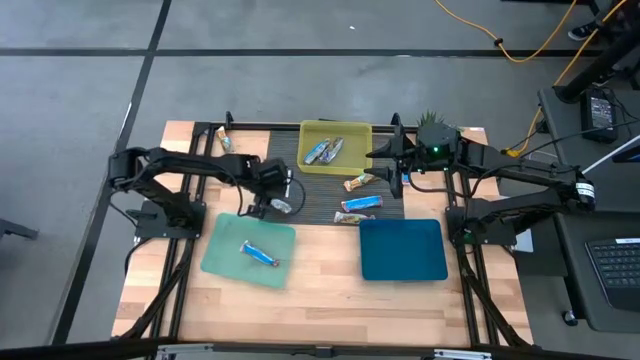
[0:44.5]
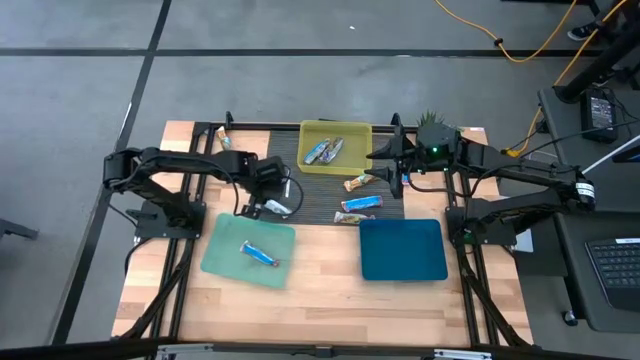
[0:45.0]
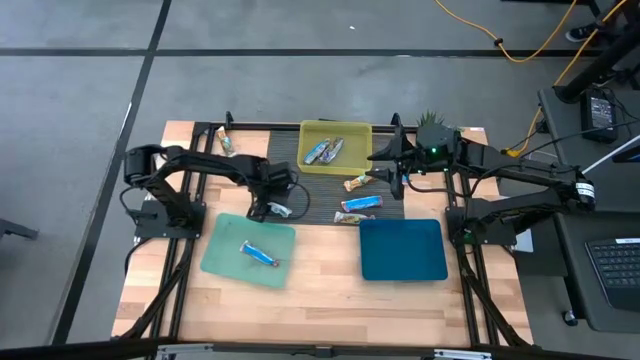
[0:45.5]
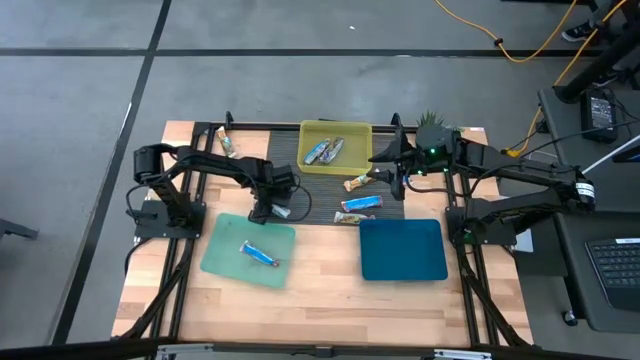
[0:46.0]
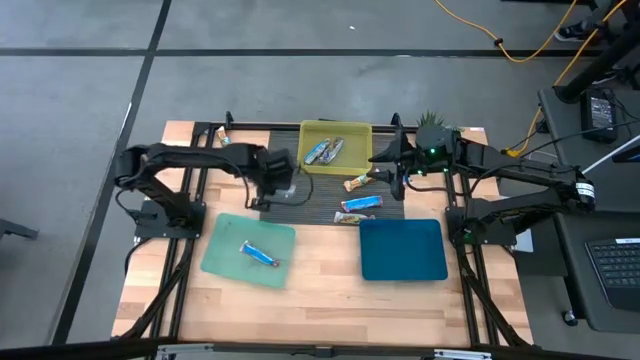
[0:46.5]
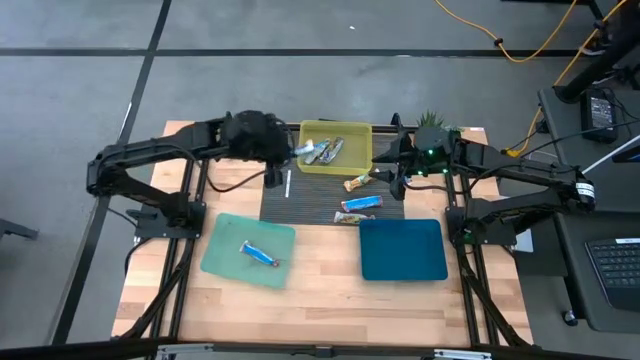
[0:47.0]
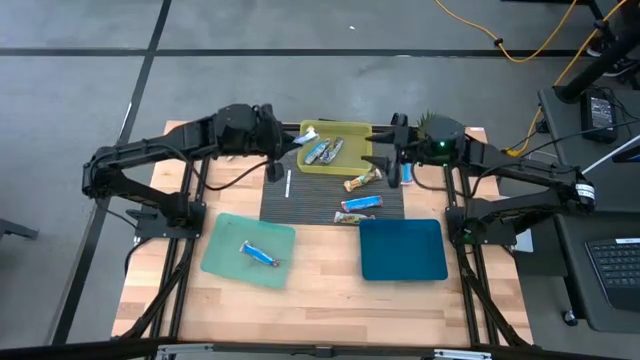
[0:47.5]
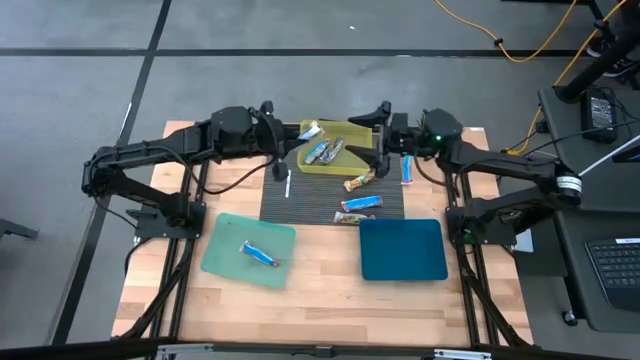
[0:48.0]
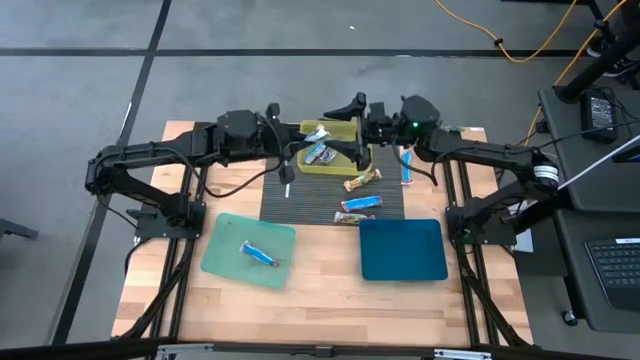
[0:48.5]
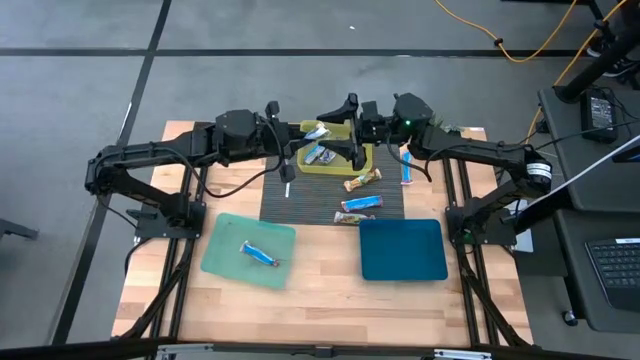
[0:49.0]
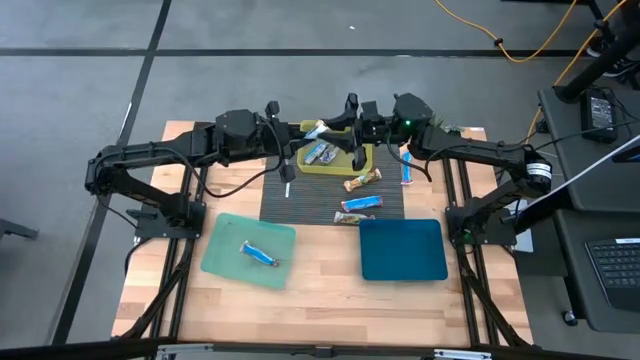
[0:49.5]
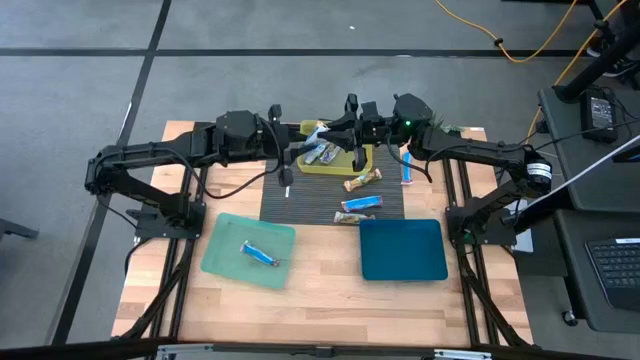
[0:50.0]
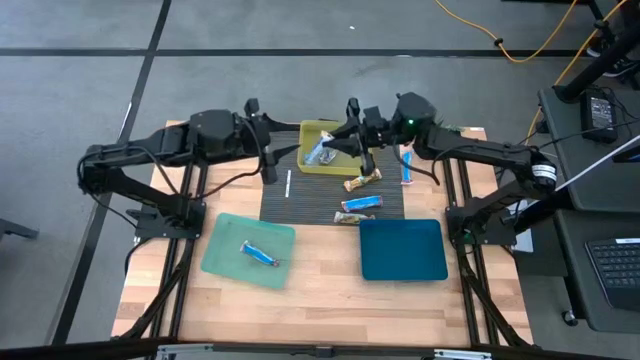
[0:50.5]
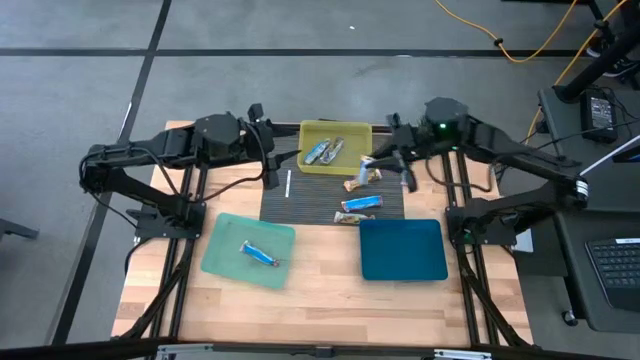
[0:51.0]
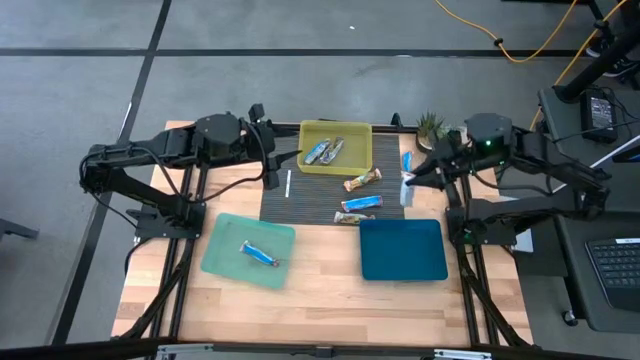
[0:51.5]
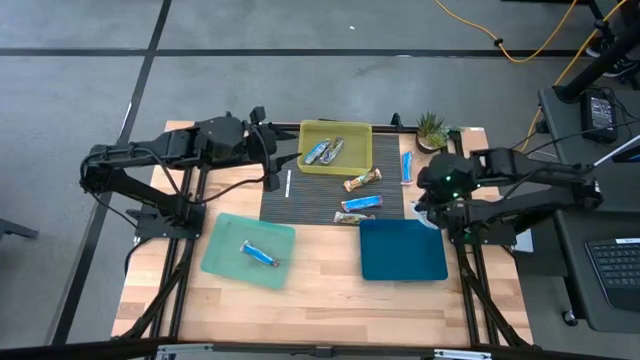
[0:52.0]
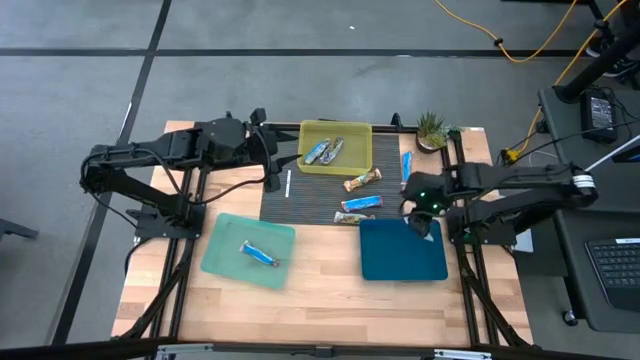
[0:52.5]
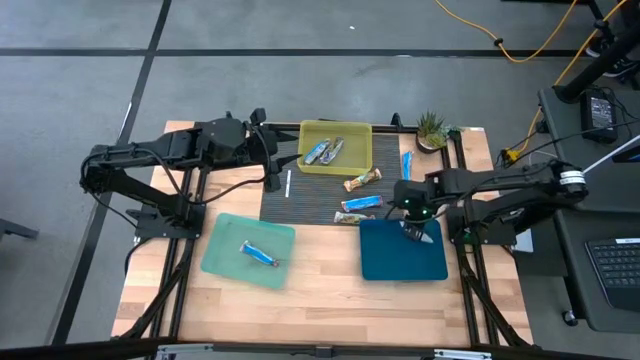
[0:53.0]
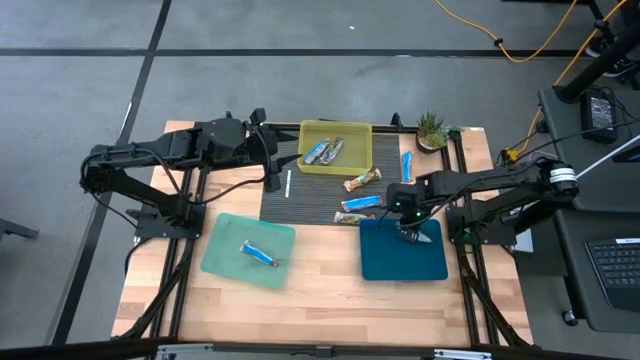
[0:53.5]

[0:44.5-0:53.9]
Task: Pick and place Granola Bars by type
Put the yellow granola bar into the blue bin

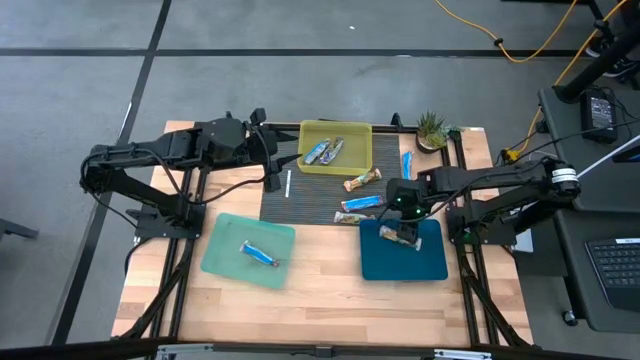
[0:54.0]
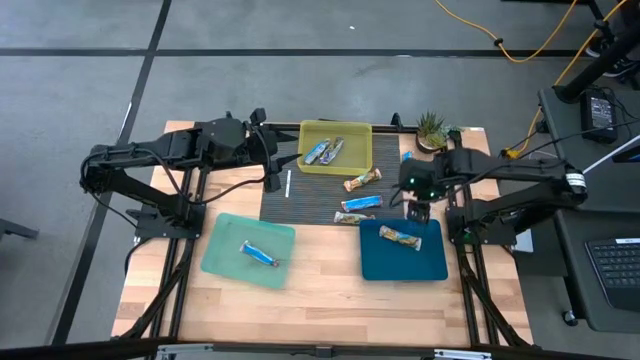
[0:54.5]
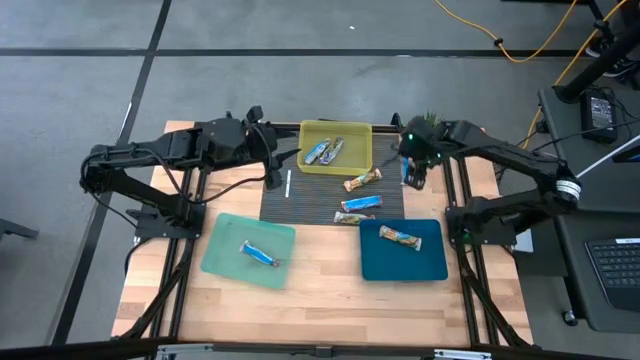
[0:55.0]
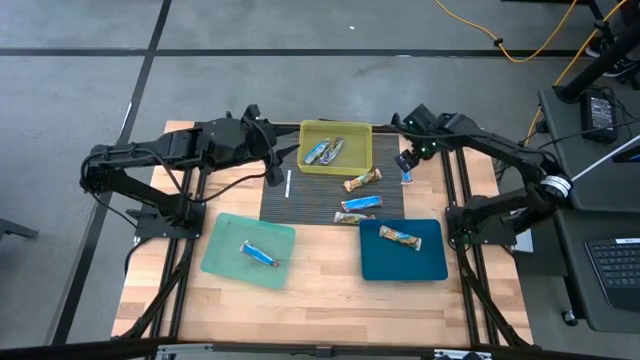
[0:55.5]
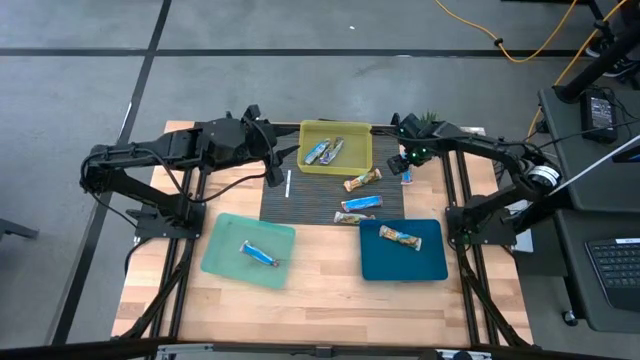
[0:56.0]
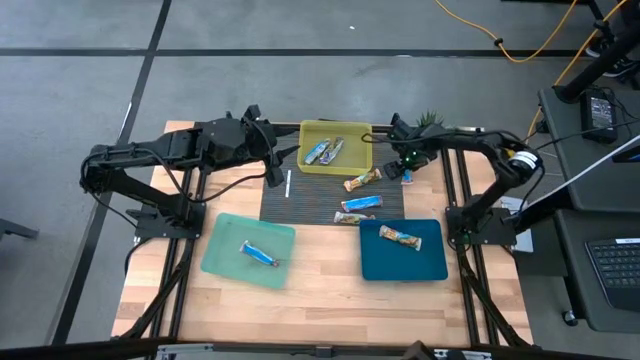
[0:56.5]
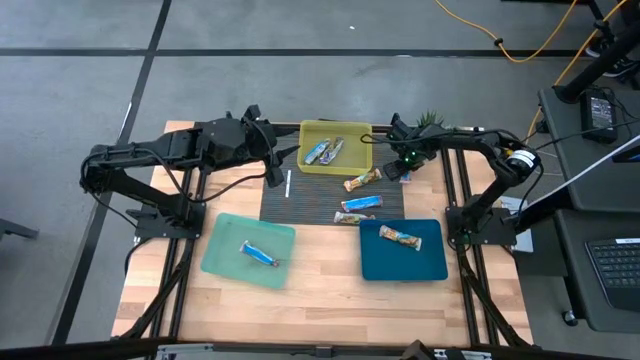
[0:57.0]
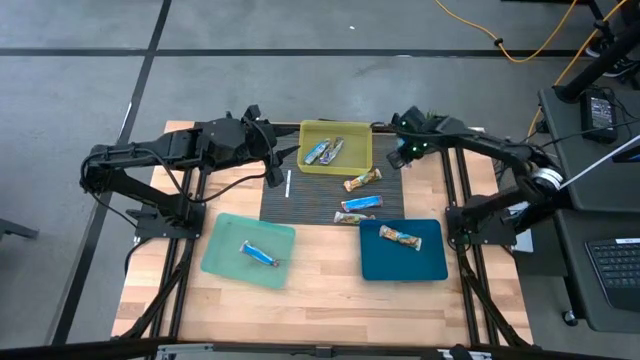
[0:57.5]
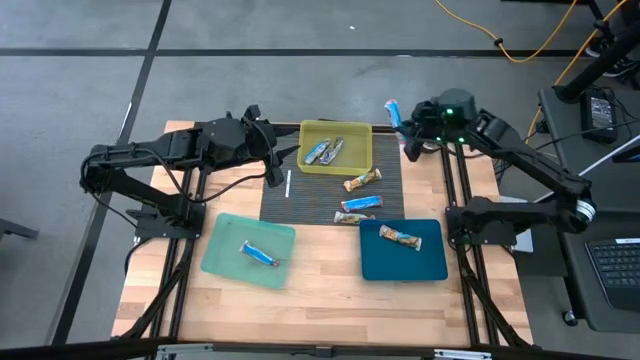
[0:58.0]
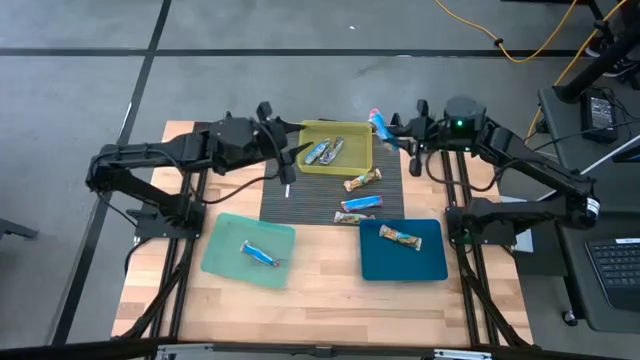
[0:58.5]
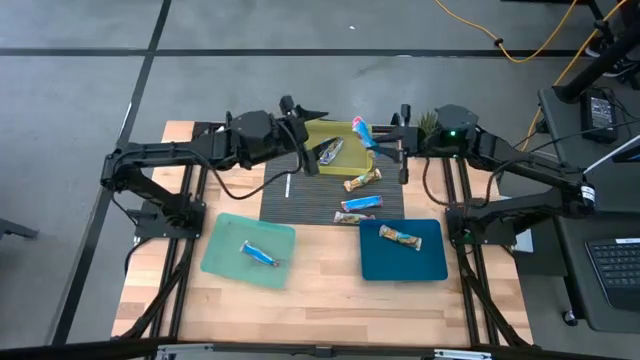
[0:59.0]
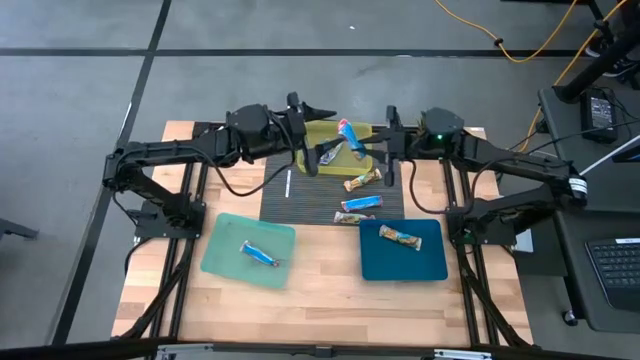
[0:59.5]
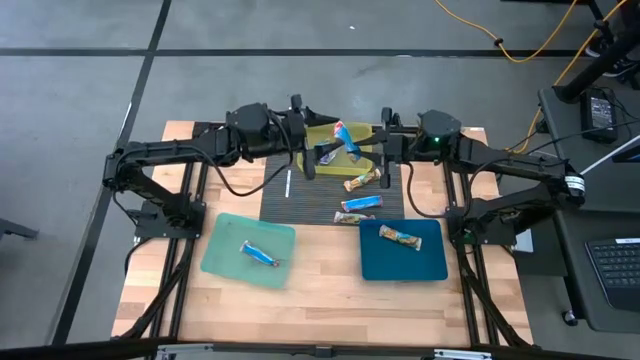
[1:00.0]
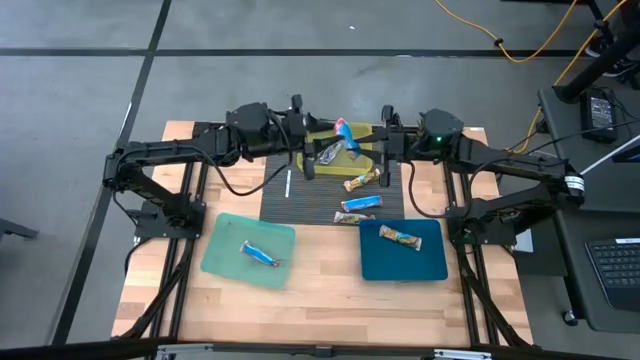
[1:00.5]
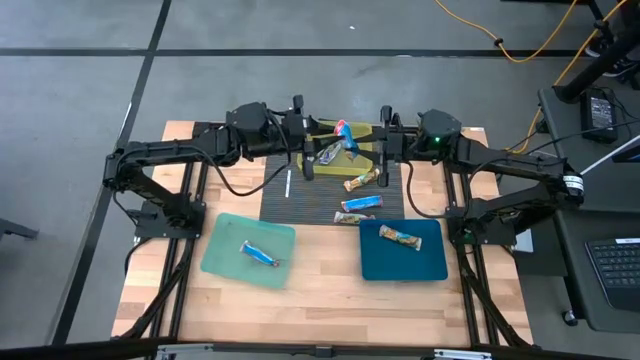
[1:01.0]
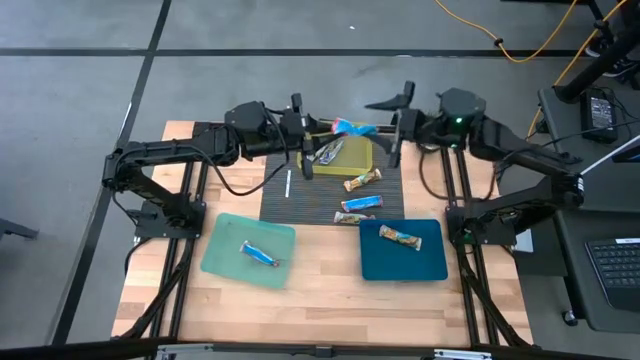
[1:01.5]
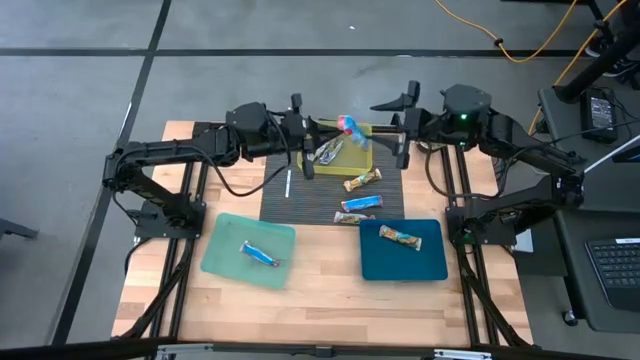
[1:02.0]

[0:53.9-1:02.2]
Put the red granola bar into the green bin

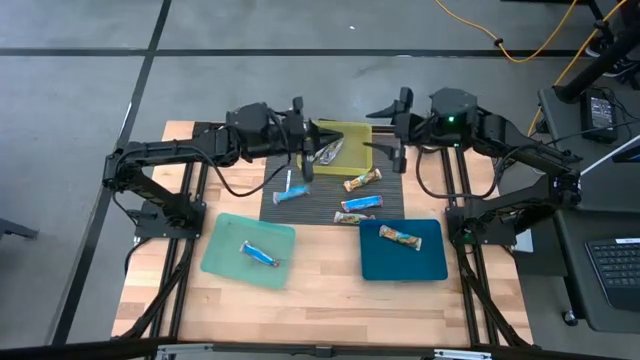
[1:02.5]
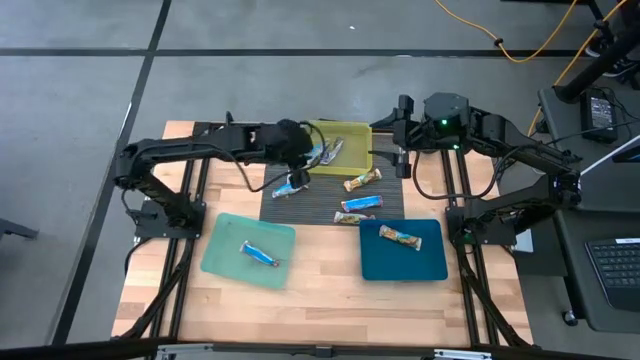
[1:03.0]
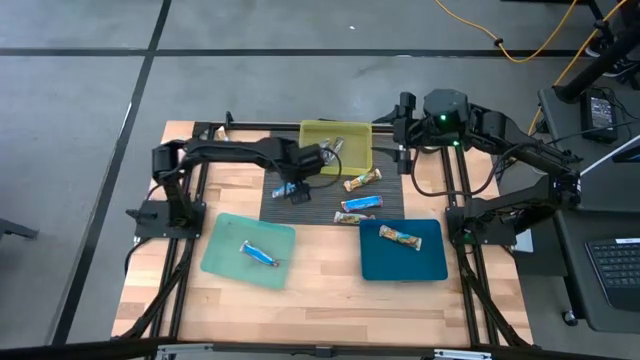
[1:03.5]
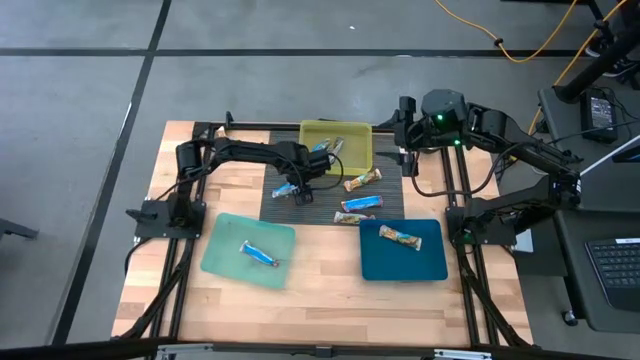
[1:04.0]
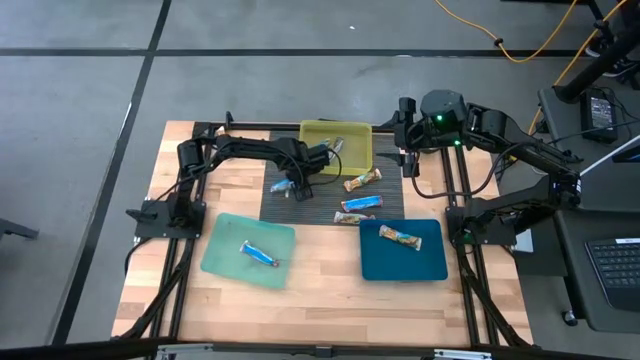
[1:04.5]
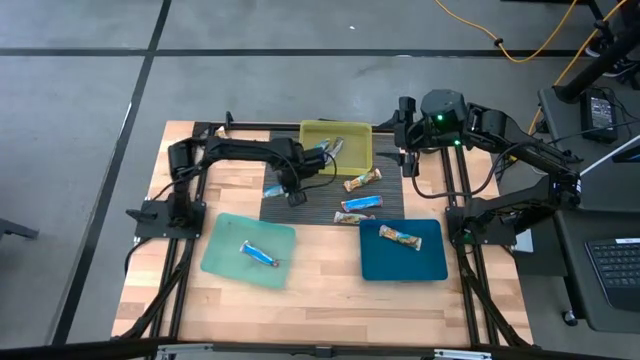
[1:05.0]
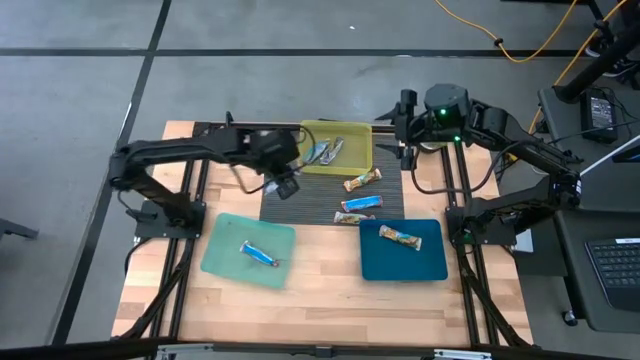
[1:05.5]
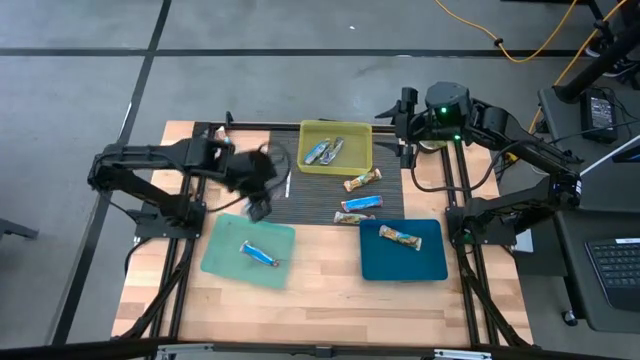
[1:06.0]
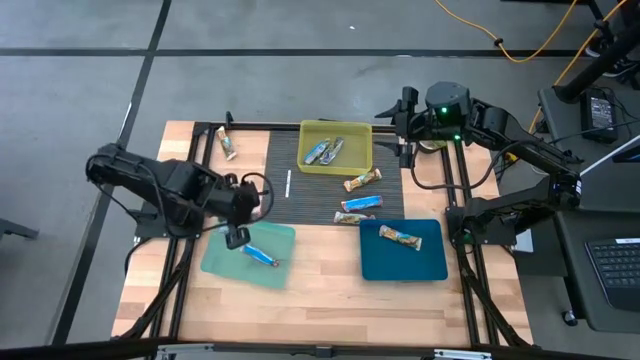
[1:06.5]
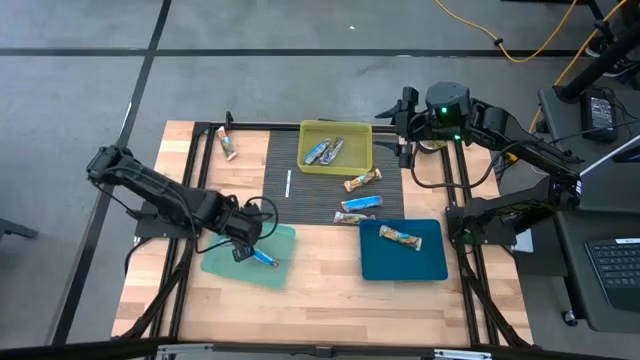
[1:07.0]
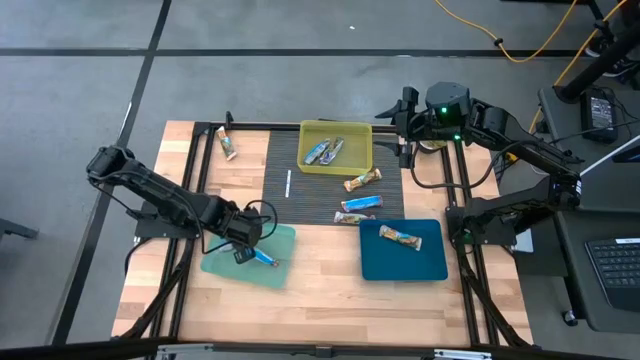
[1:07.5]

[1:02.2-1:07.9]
Put the red granola bar into the green bin
